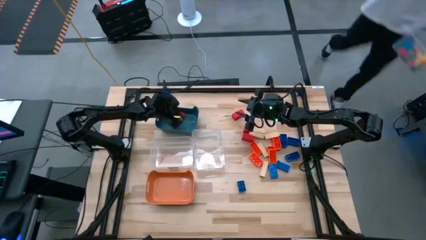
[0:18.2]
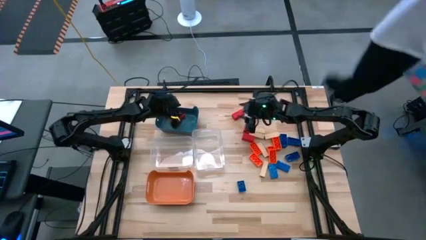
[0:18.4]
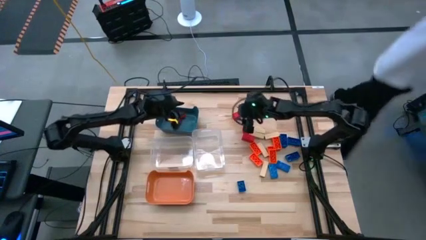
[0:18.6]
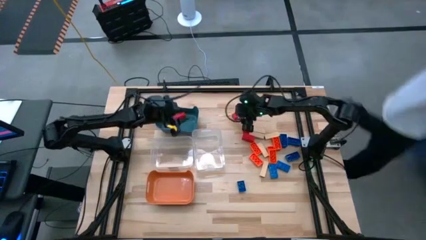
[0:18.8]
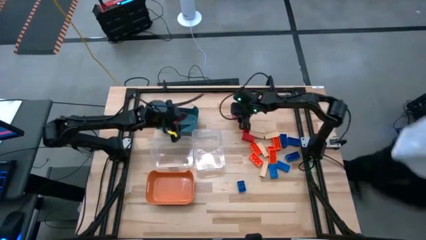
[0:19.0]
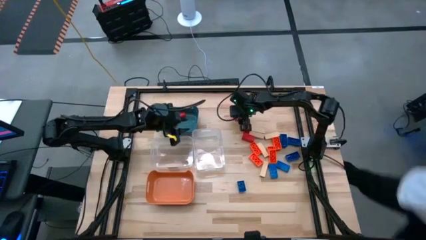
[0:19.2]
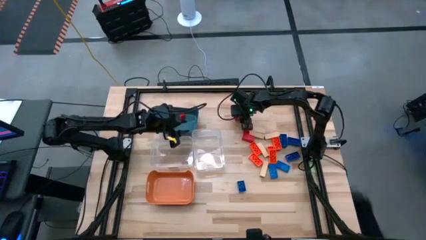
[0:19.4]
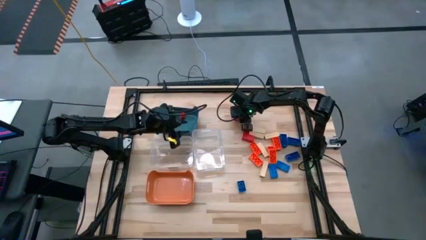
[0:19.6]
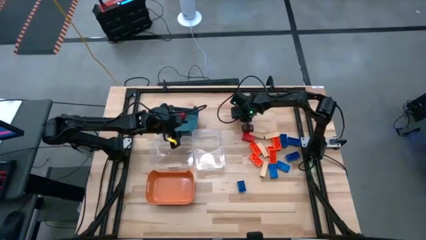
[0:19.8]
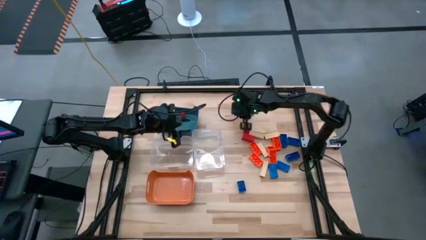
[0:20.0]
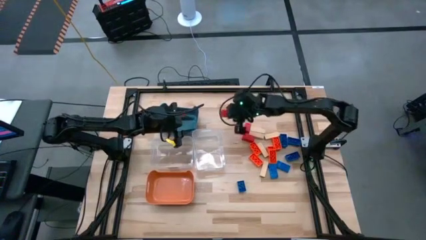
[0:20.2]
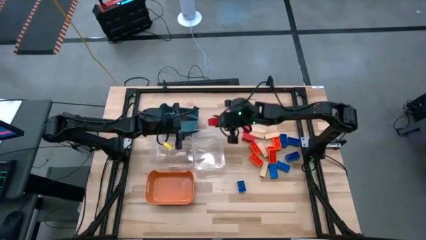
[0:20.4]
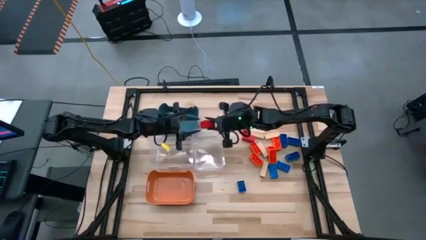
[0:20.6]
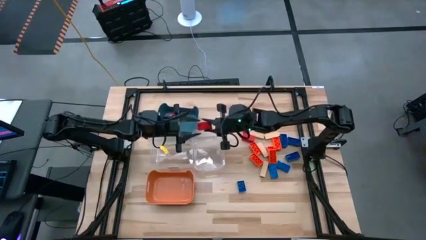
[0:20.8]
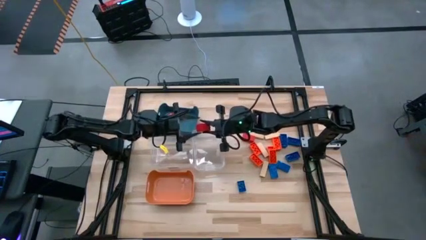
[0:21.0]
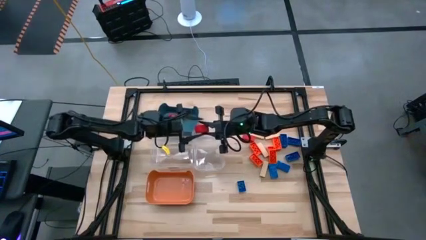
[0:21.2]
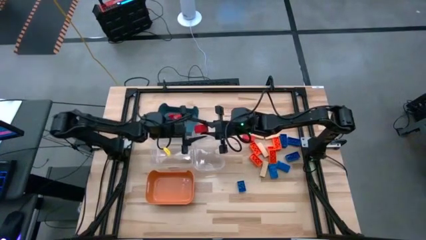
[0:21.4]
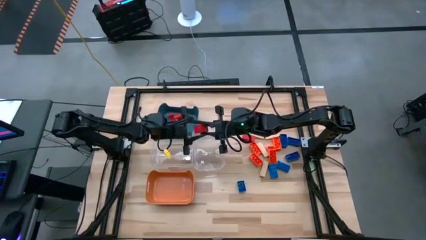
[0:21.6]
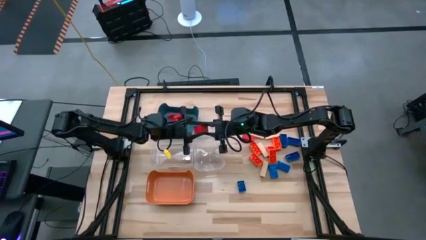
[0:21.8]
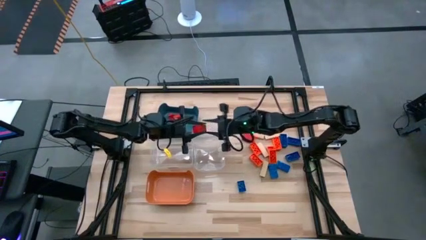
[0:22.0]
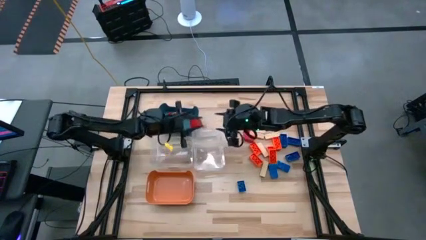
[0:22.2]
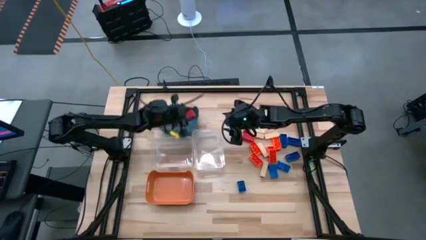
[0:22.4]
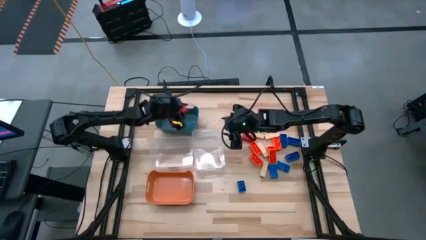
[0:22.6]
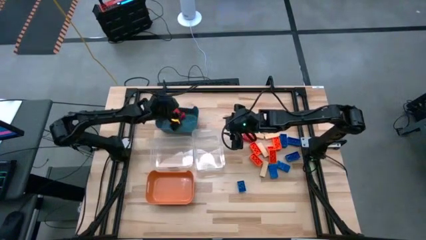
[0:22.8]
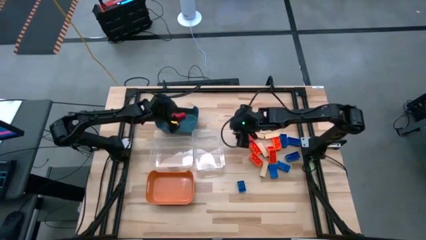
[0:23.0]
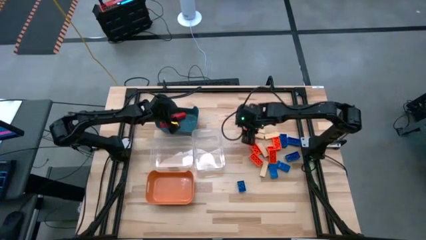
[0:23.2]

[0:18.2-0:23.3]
Task: Sort blocks
Put the red block into the blue bin

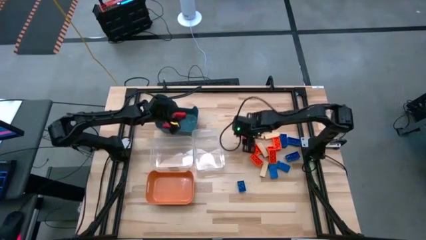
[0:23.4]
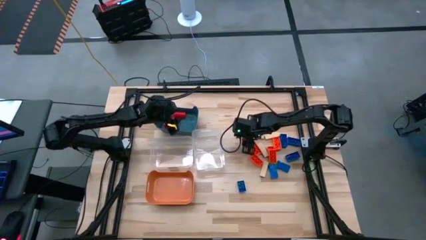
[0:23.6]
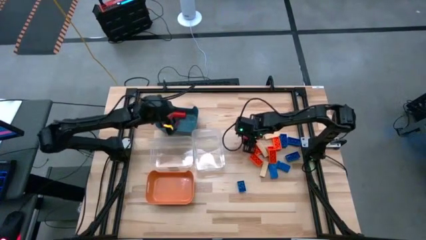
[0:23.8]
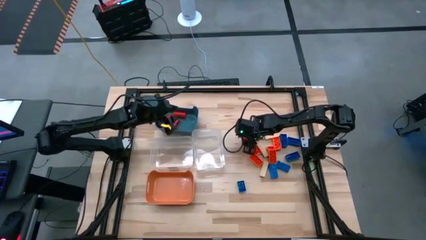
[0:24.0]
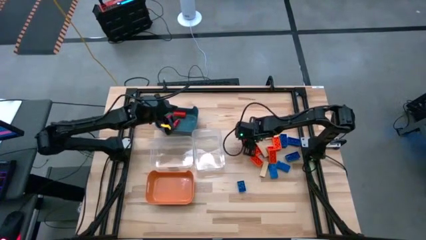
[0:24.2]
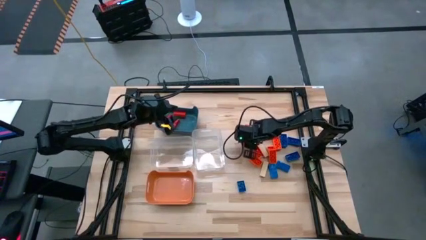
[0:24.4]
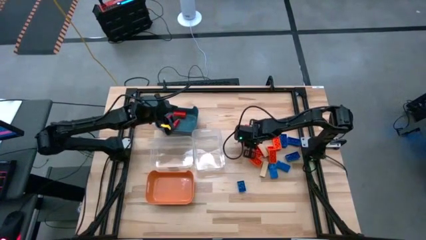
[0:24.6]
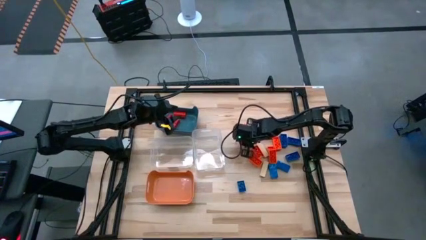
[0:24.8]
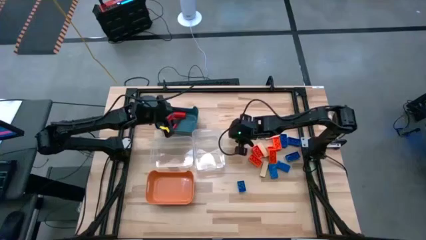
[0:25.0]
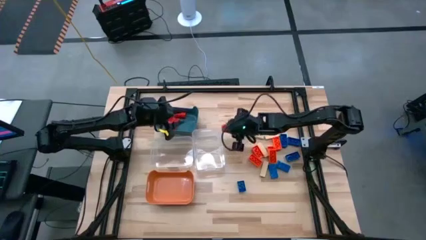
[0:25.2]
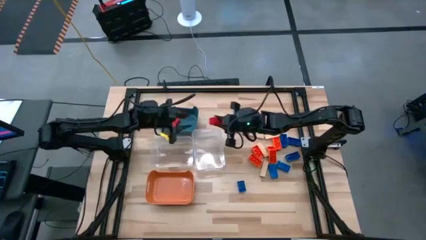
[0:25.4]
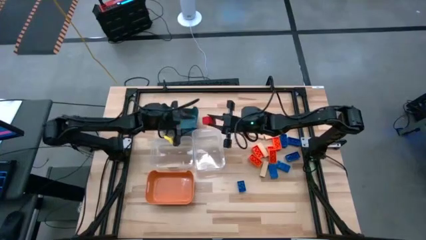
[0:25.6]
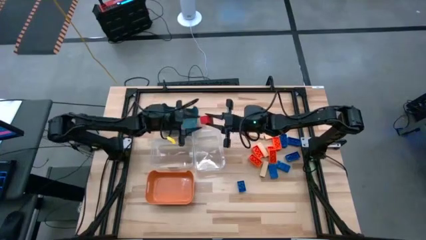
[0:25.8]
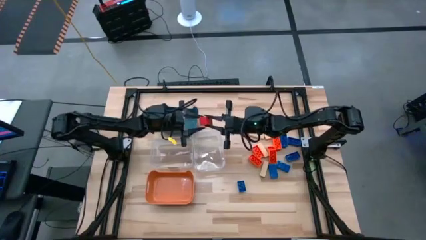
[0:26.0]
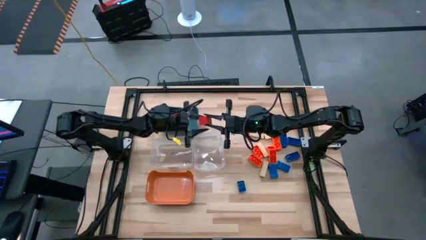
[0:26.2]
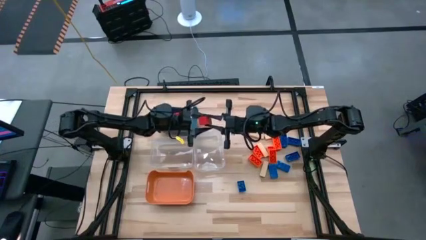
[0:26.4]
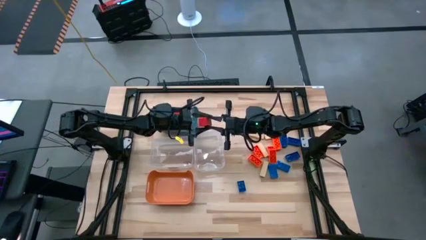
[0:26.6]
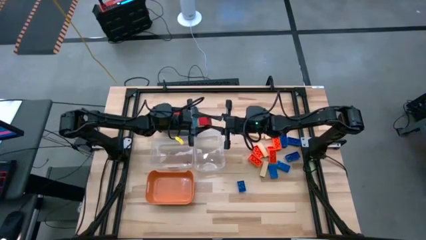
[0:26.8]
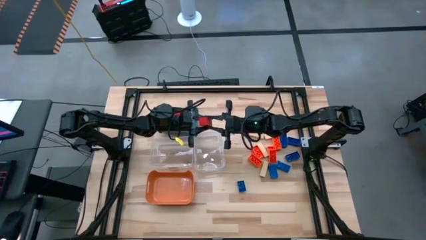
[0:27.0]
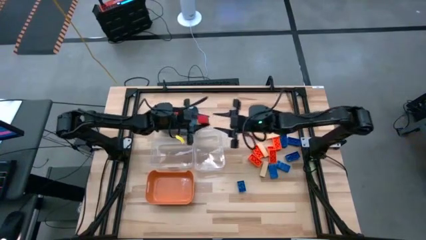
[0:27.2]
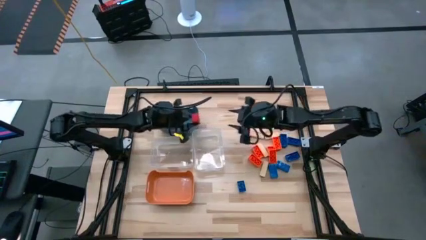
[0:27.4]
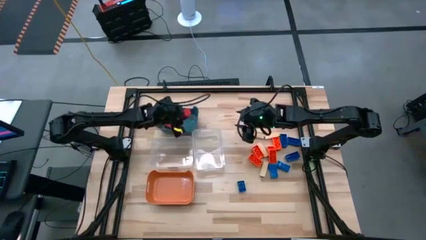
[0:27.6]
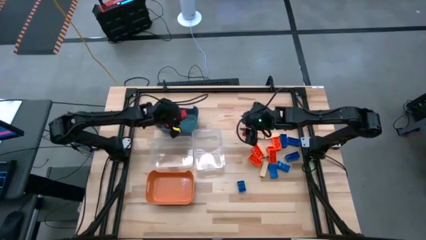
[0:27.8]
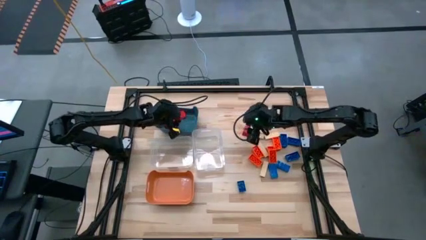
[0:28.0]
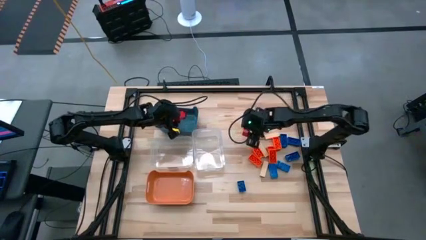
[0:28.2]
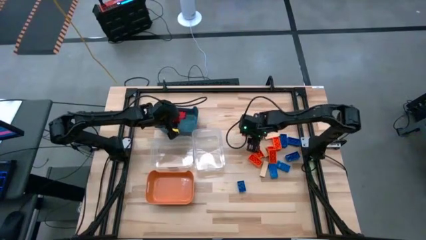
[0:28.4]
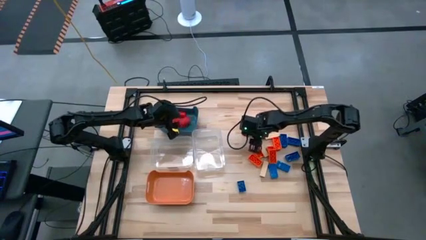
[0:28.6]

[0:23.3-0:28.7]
Put the red block into the blue bin

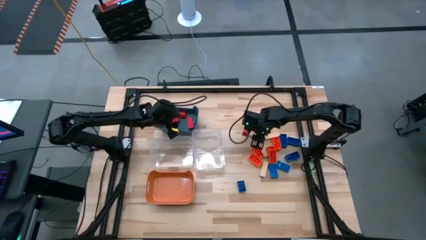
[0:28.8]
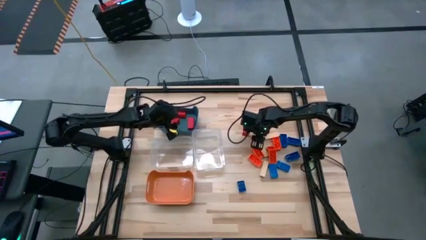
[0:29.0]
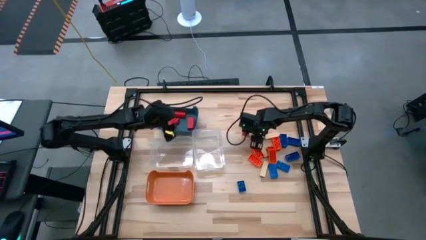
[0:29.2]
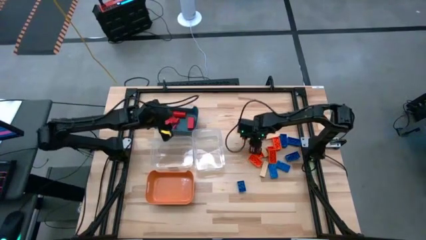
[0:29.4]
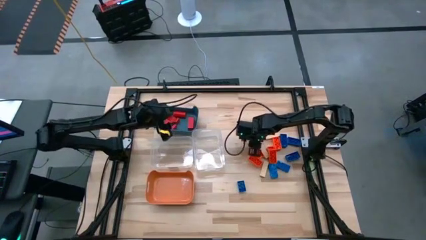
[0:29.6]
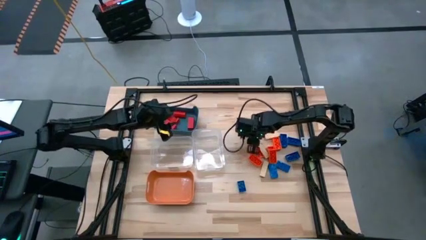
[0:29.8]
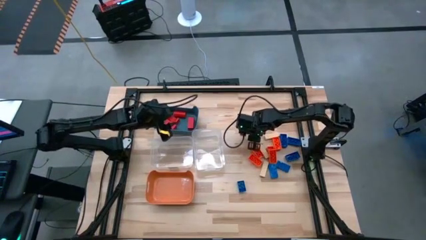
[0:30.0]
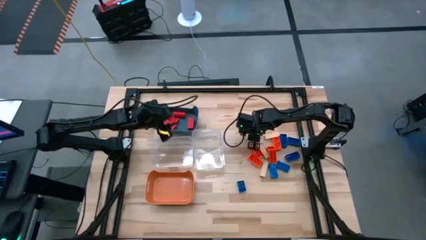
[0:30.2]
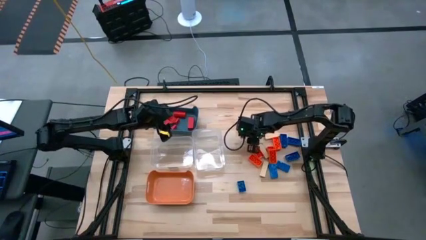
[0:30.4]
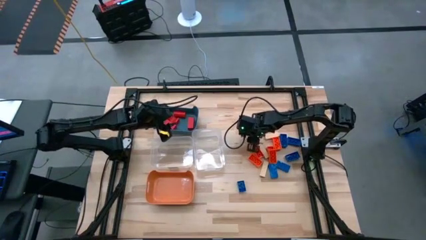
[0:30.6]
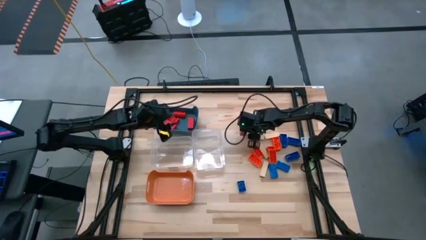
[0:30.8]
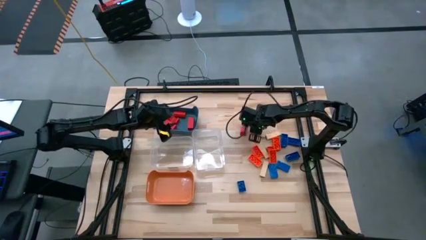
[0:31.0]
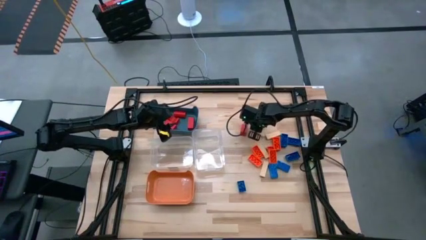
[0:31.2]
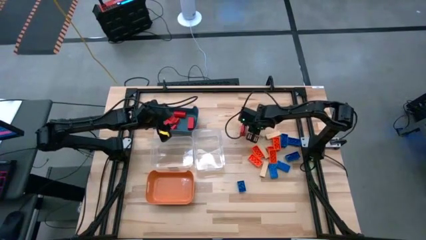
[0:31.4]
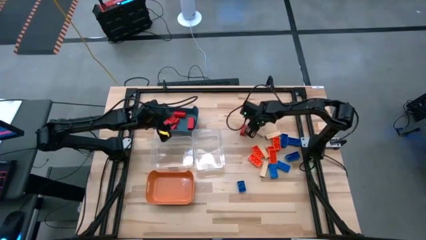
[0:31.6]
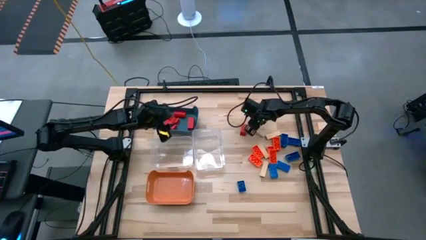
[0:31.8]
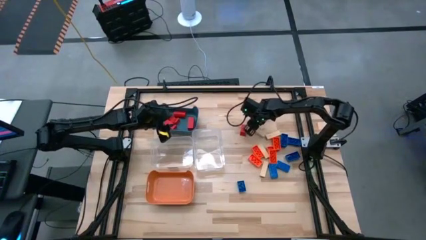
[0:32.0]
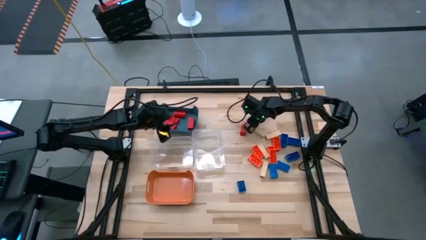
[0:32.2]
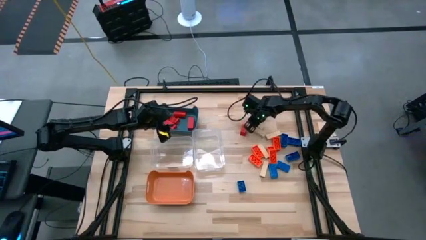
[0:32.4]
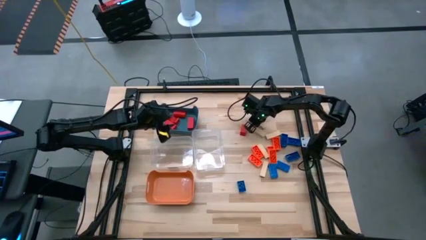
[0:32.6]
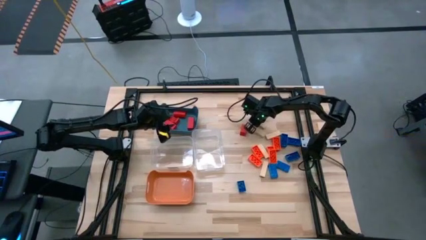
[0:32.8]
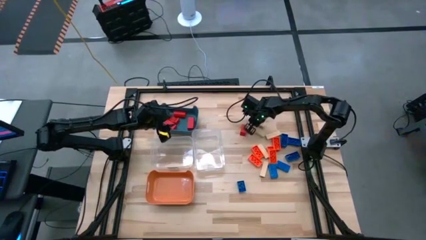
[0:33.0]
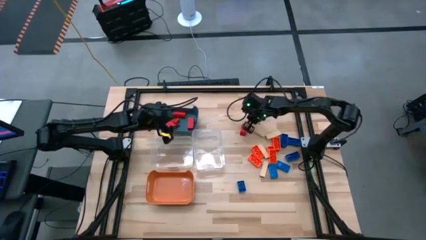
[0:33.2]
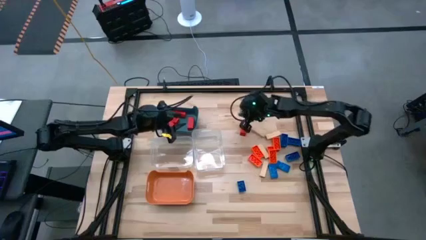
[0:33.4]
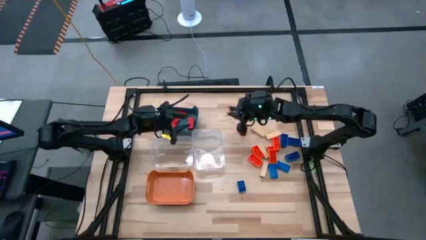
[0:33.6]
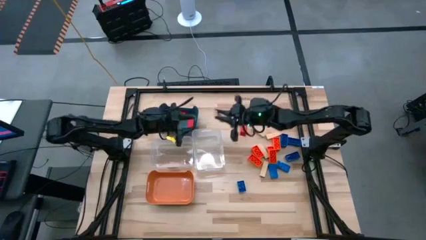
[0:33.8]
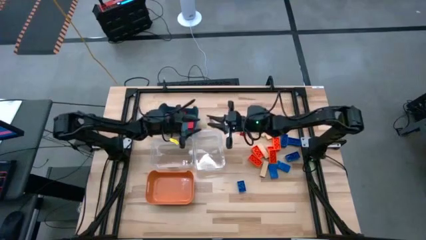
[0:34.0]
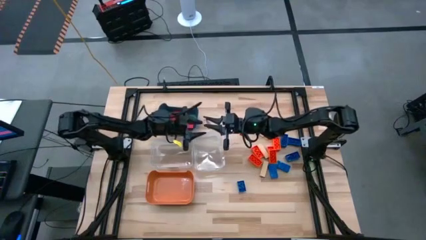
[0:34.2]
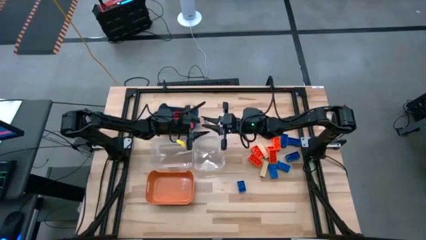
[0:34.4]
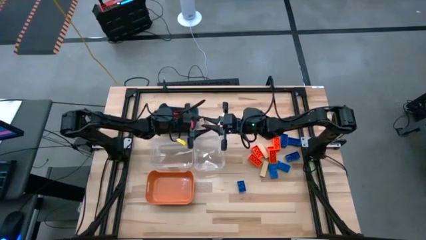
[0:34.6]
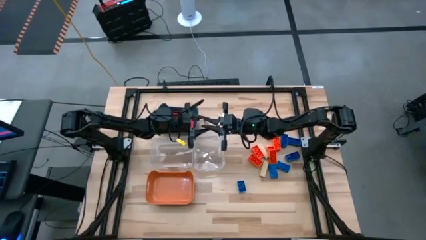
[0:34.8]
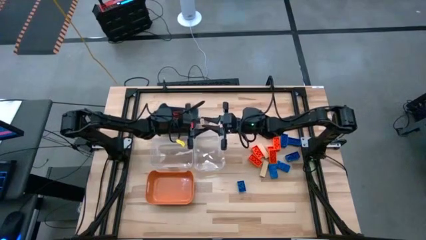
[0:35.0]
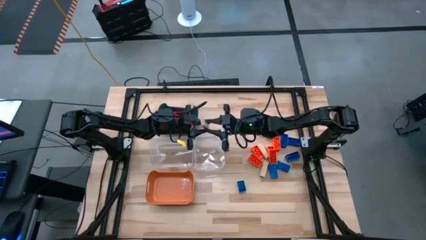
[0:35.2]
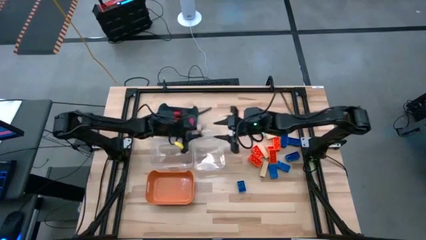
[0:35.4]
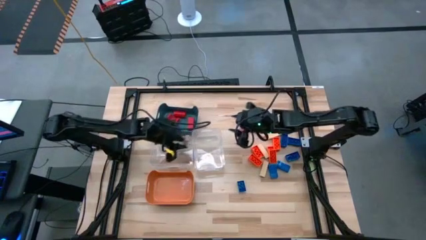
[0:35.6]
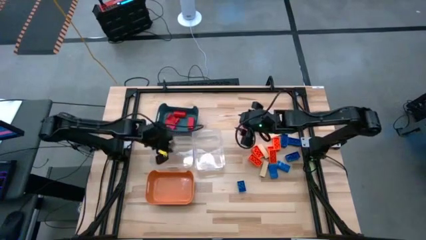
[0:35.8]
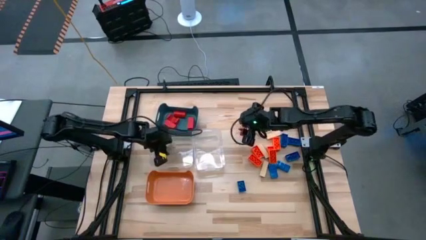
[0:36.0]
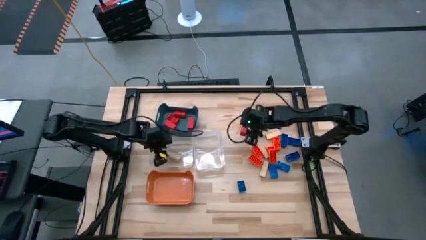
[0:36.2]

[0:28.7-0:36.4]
Put the brown block into the left transparent bin
